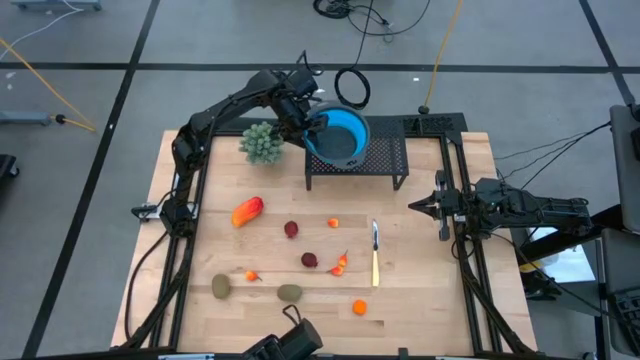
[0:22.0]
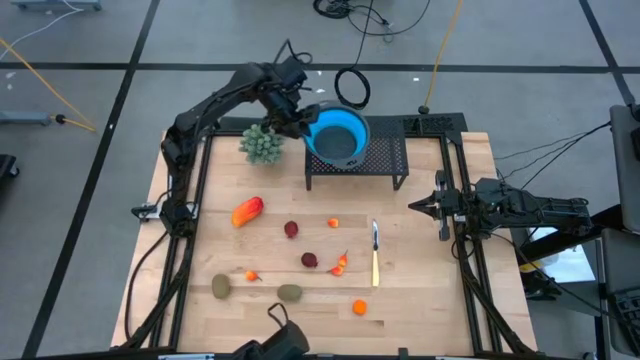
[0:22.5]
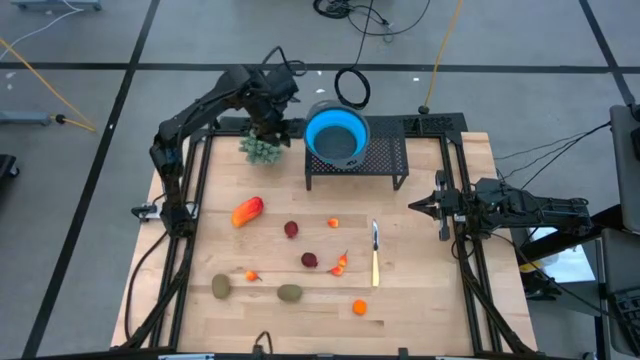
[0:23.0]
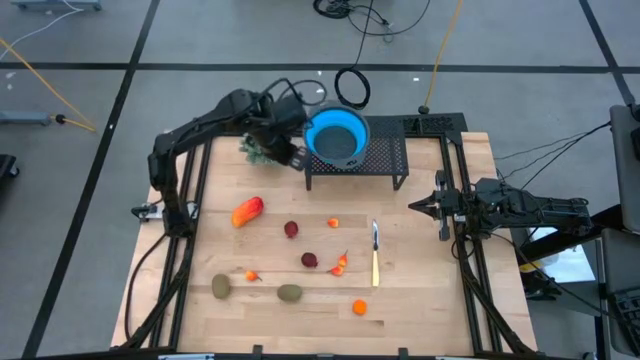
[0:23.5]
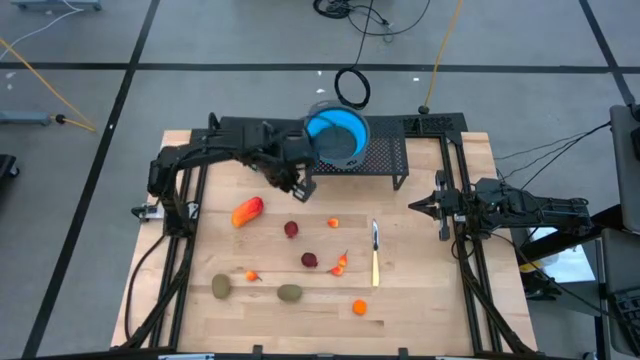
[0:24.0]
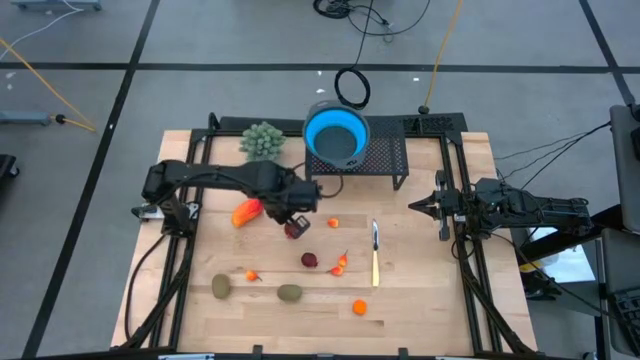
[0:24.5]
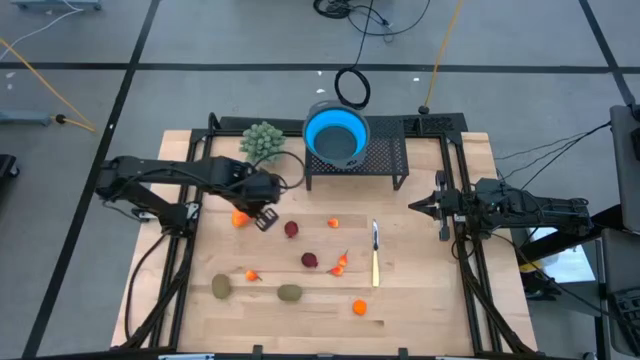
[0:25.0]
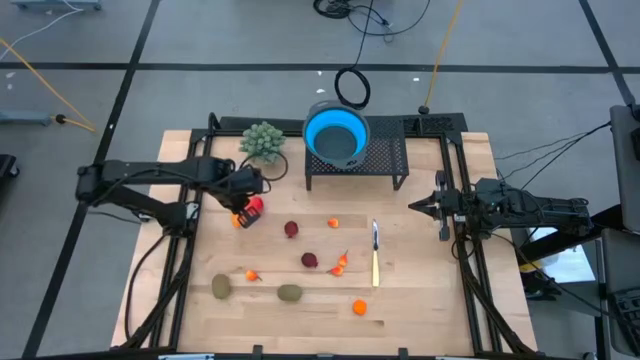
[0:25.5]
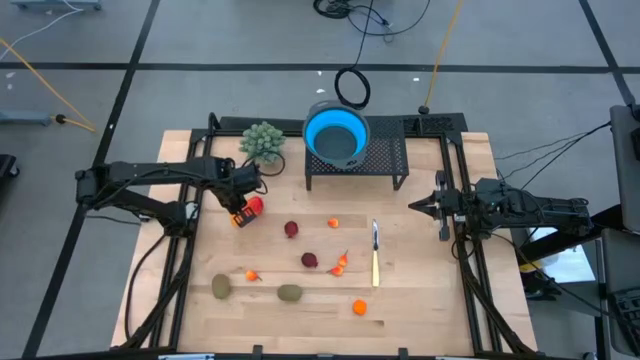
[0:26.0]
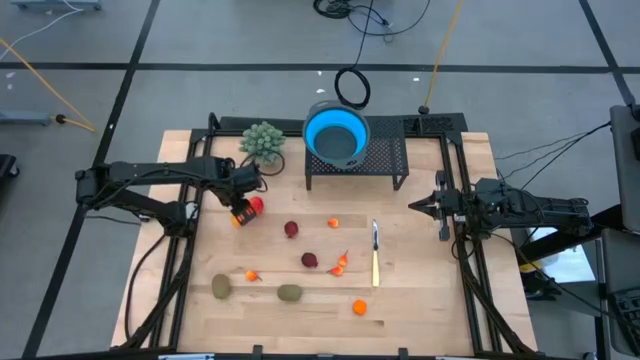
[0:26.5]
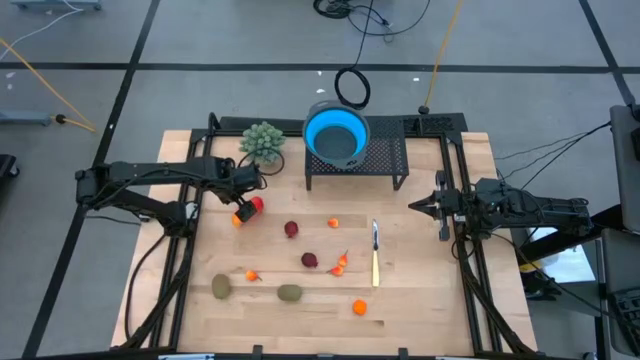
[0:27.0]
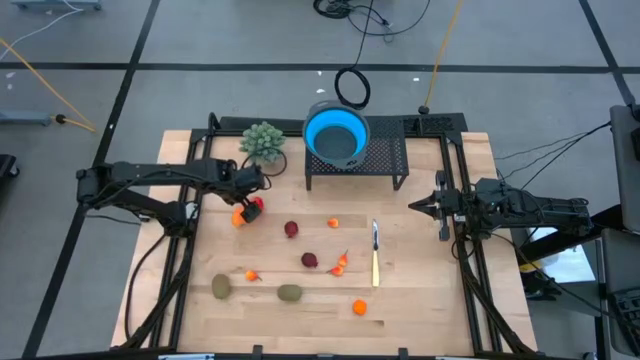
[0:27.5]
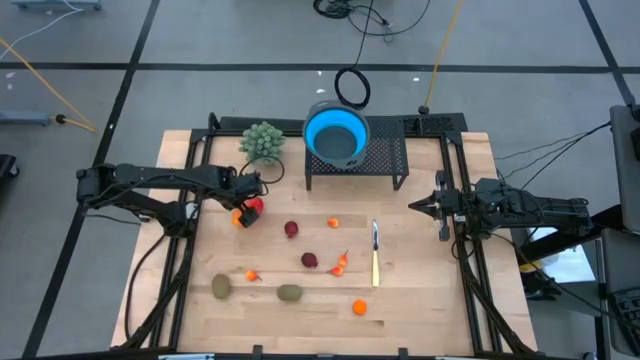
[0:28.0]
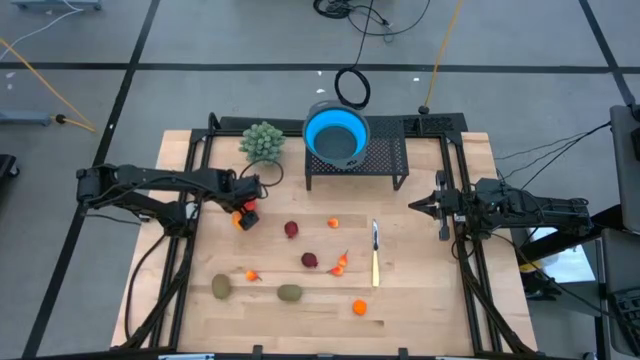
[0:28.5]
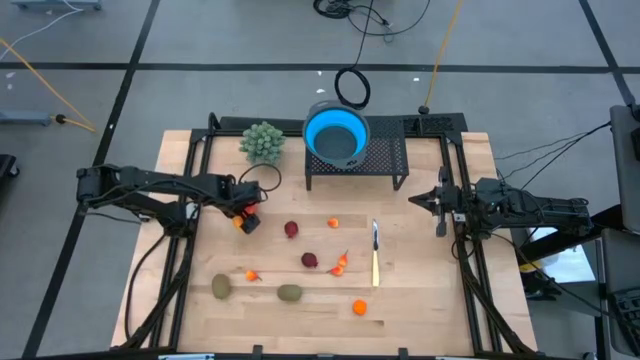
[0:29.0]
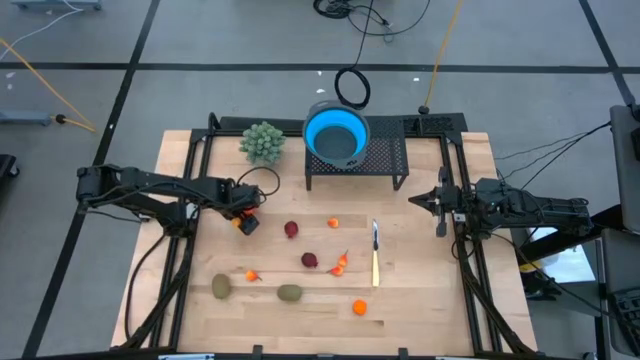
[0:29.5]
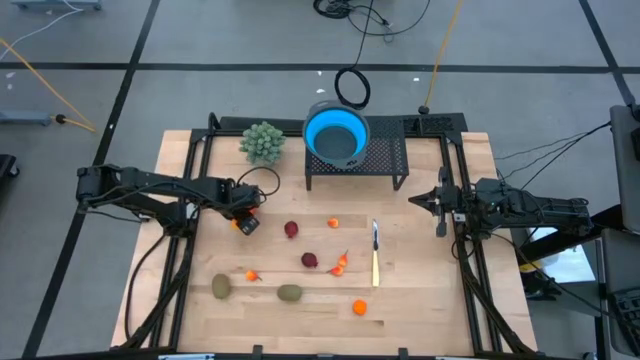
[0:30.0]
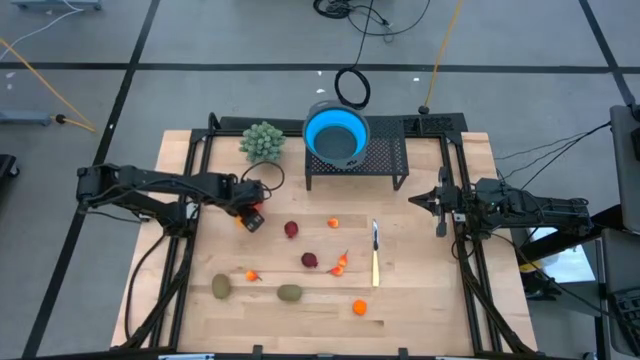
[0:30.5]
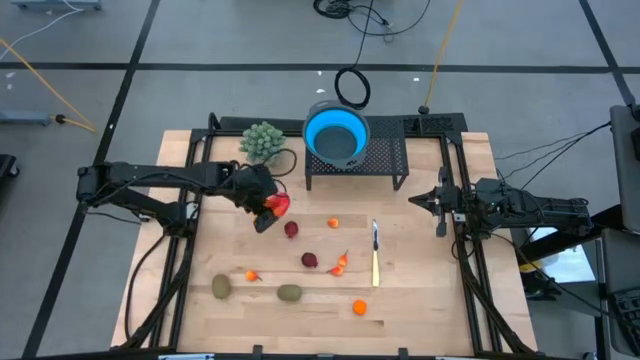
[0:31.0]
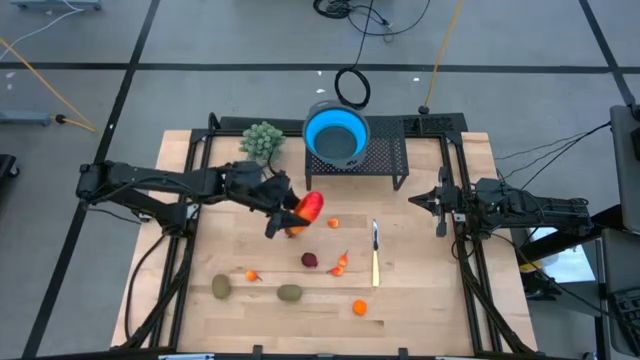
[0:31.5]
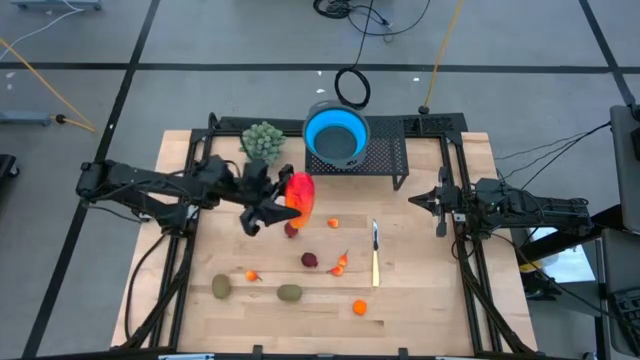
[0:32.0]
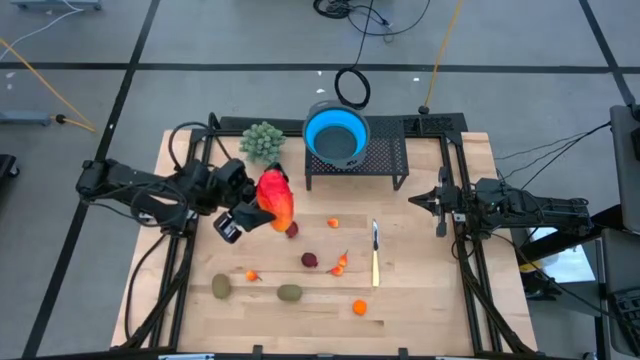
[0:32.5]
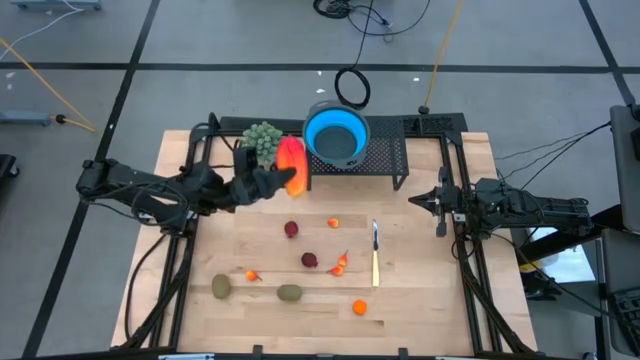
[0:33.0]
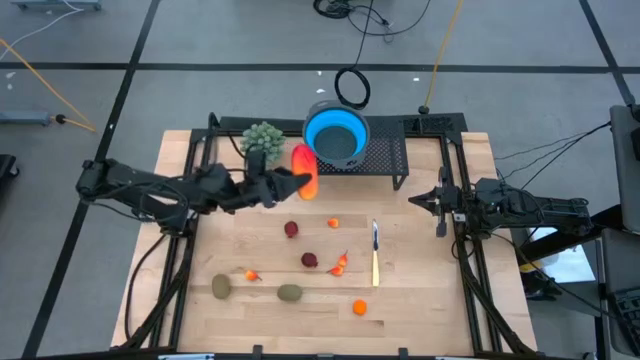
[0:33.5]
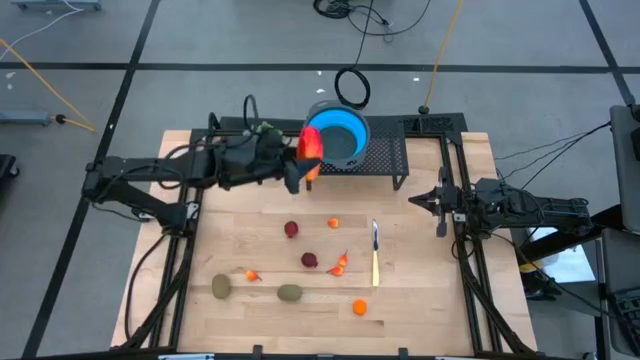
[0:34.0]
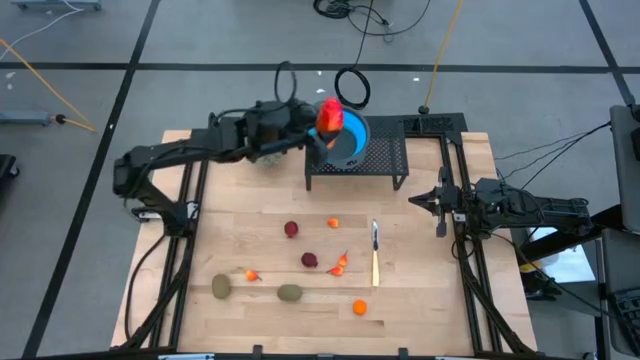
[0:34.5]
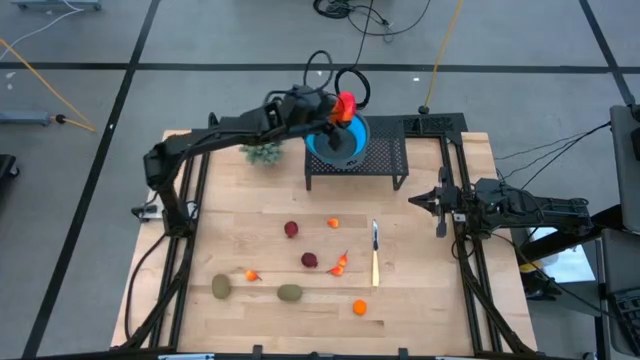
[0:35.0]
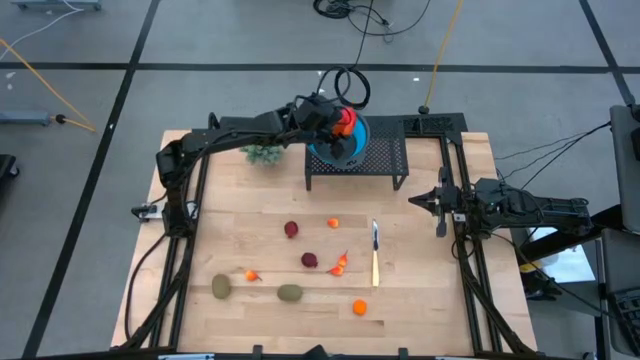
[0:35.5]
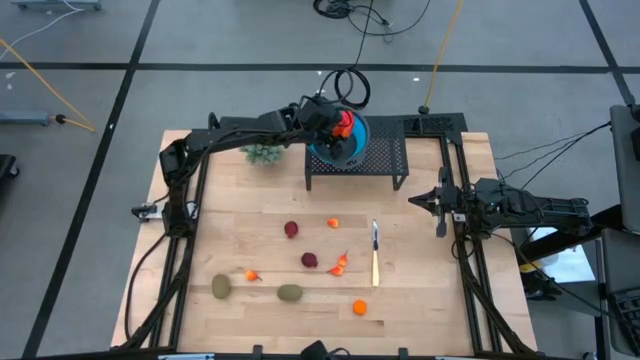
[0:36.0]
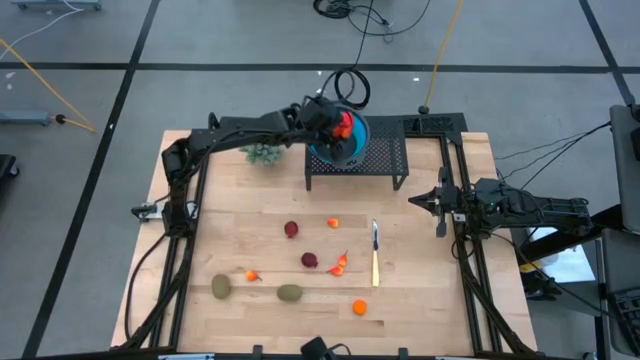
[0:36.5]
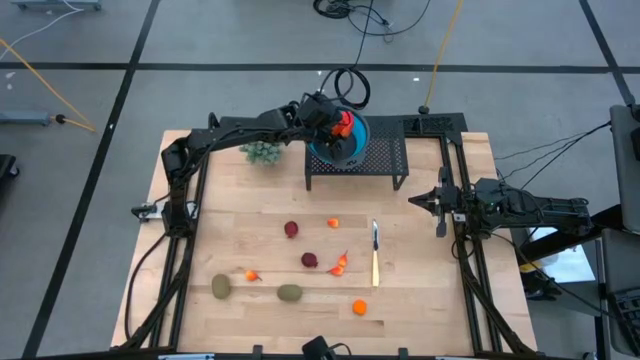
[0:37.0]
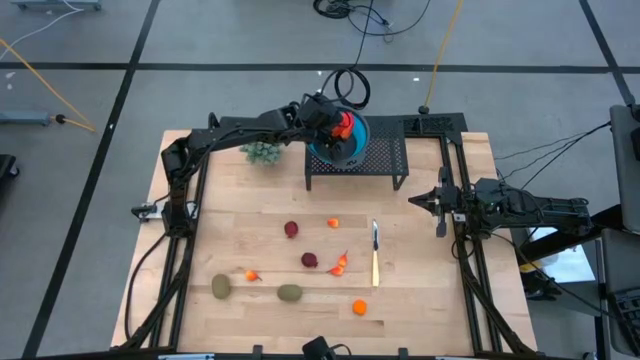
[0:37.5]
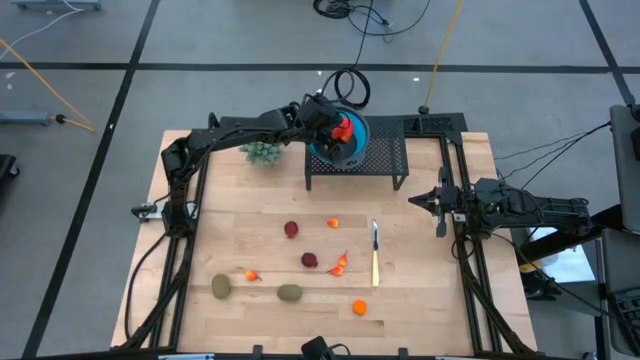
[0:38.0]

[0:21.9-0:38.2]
Task: Pick & Place Fruit
Put the orange mango into the blue strainer bowl on the shelf
